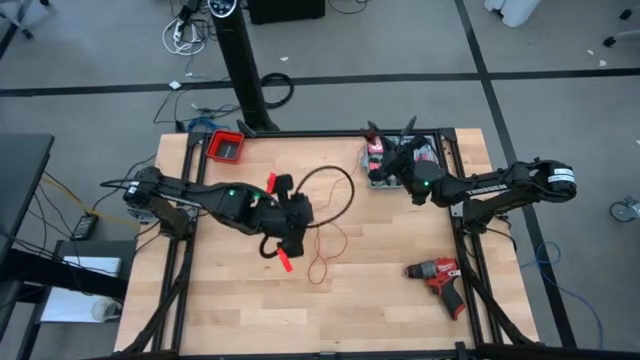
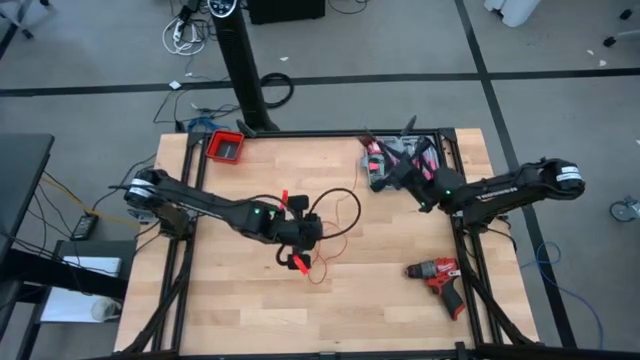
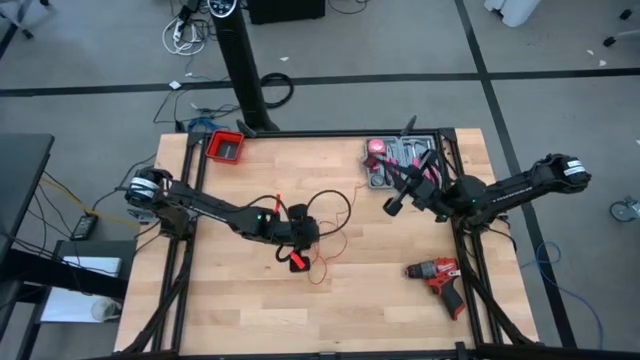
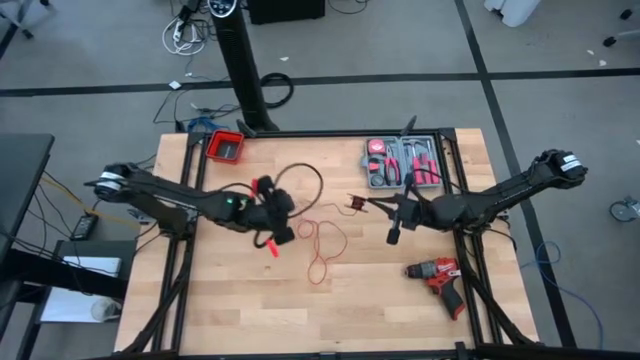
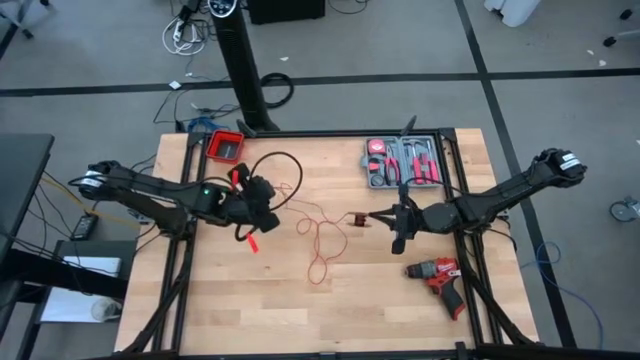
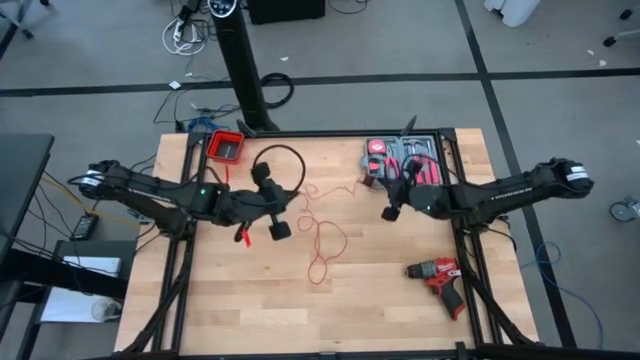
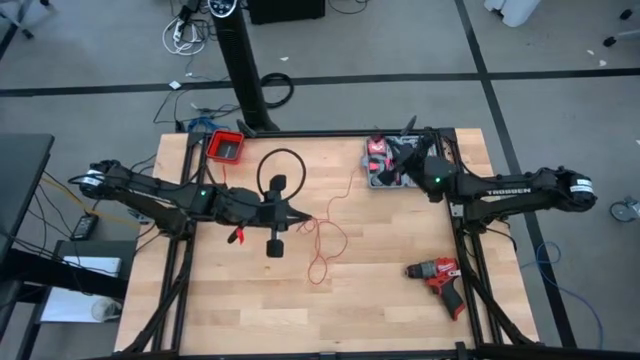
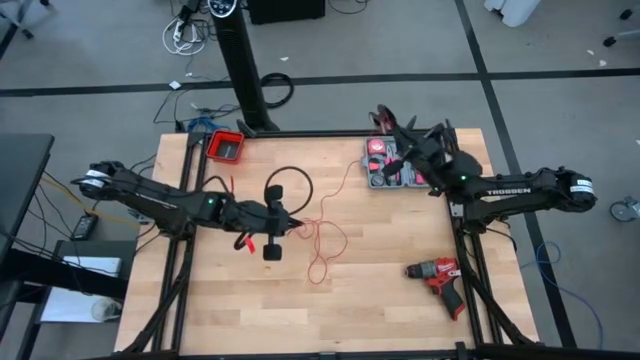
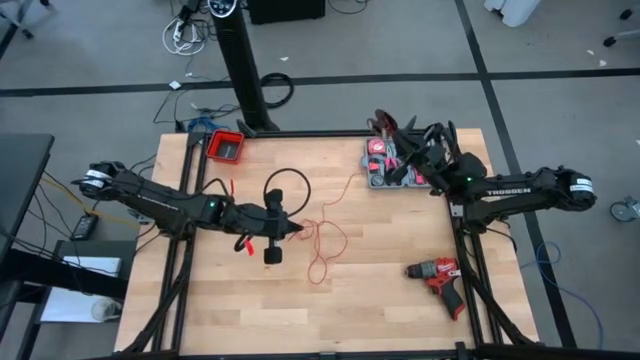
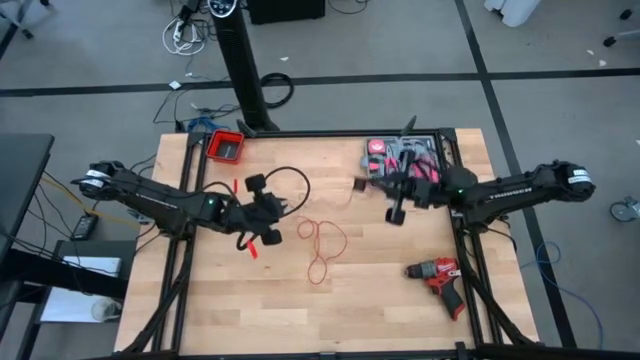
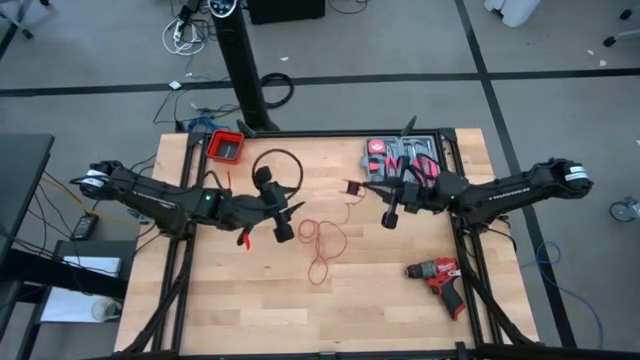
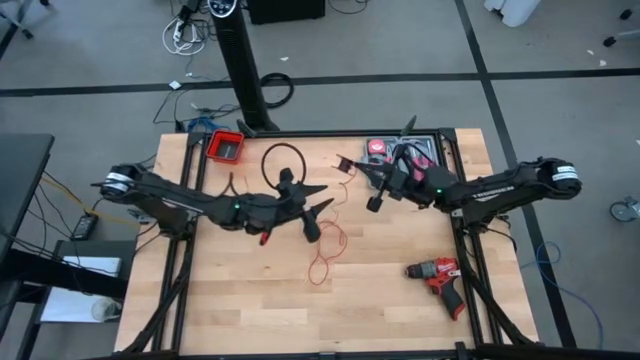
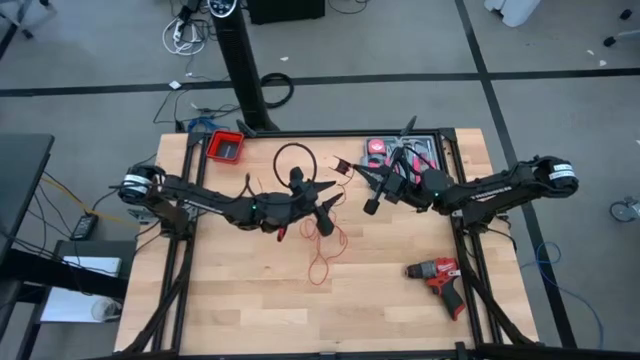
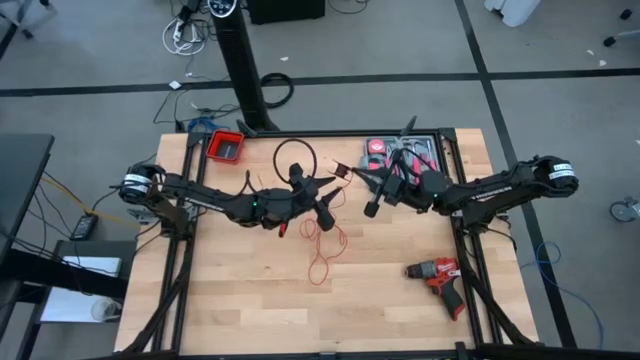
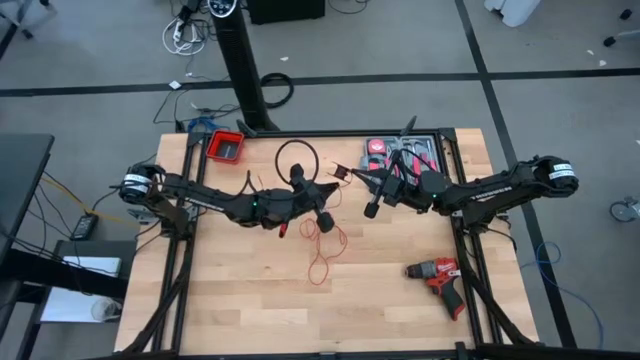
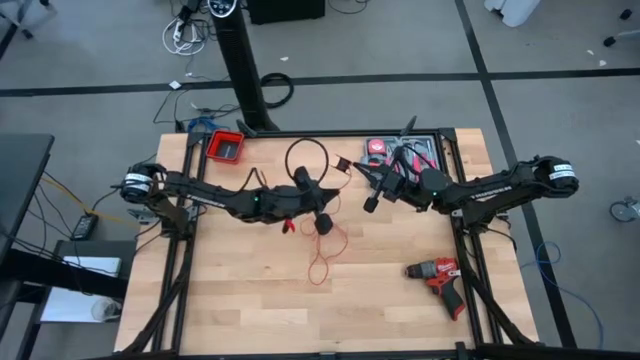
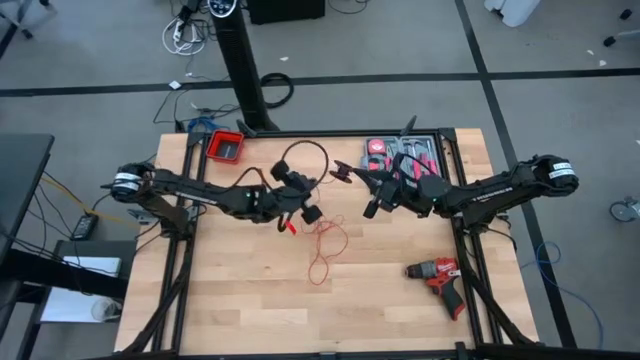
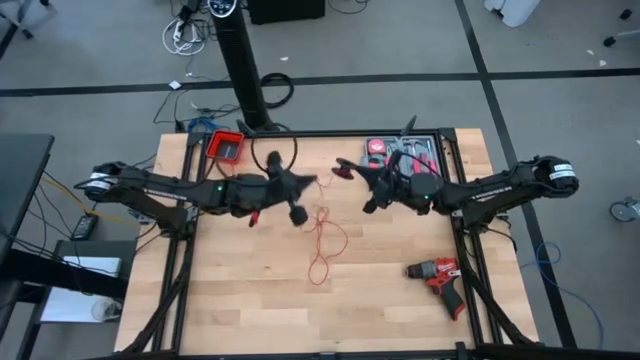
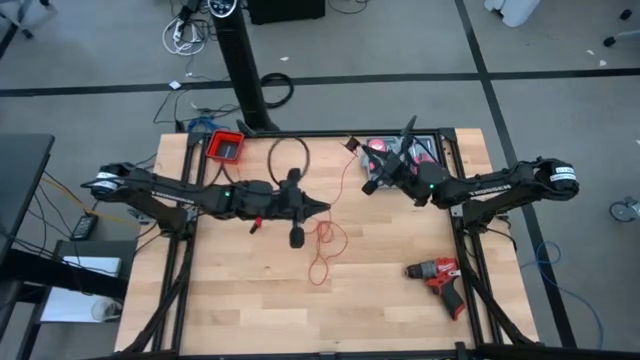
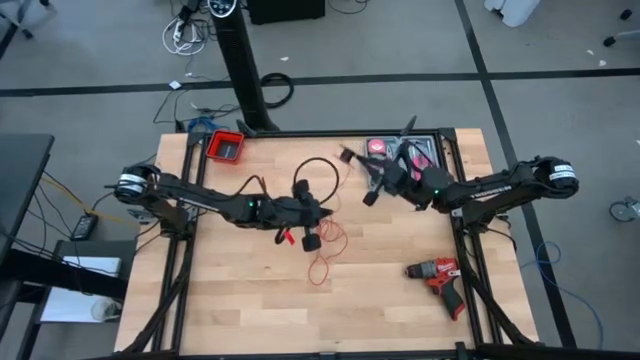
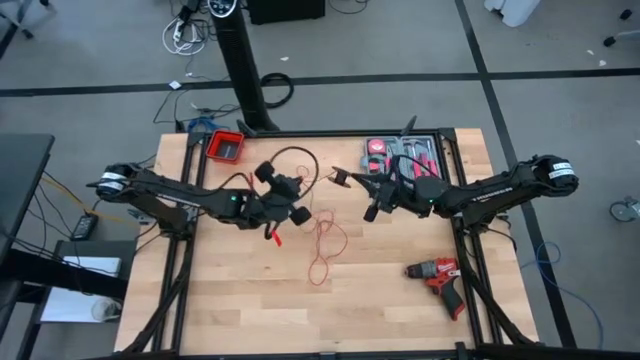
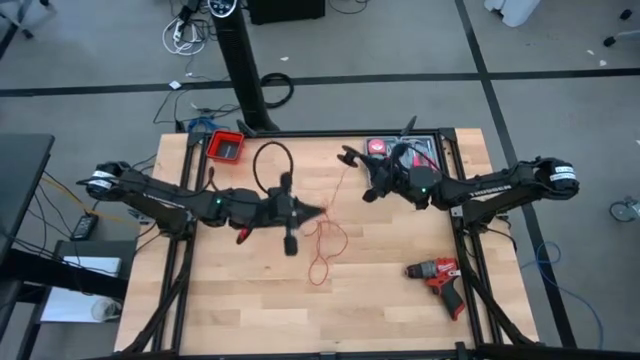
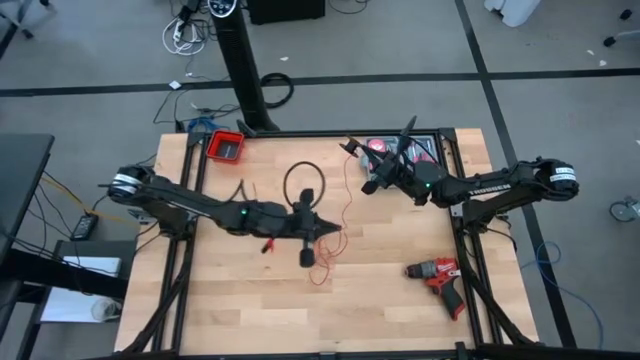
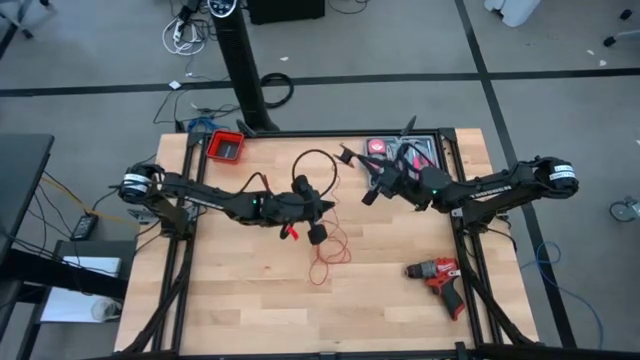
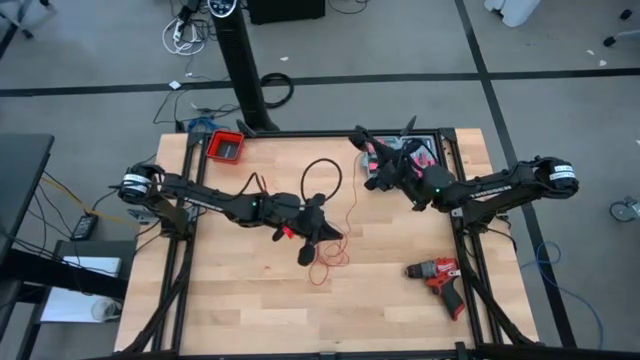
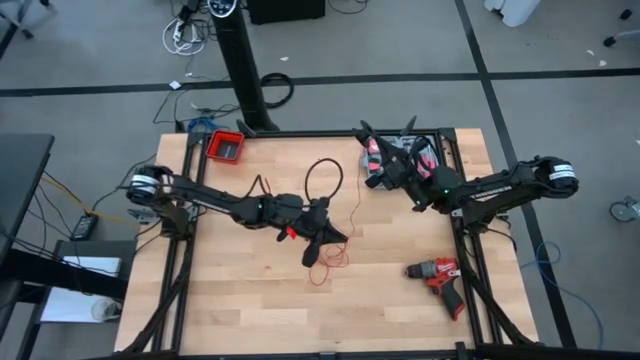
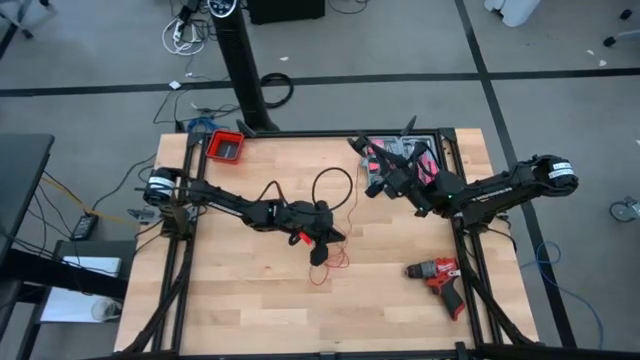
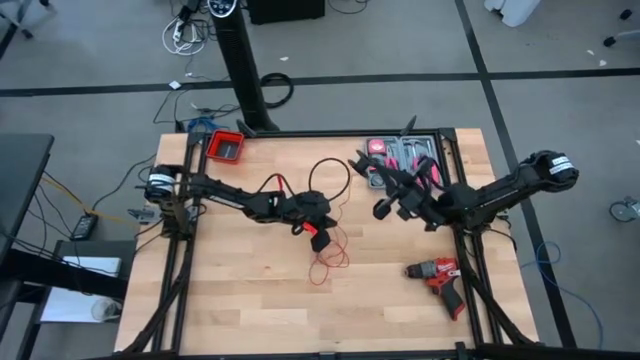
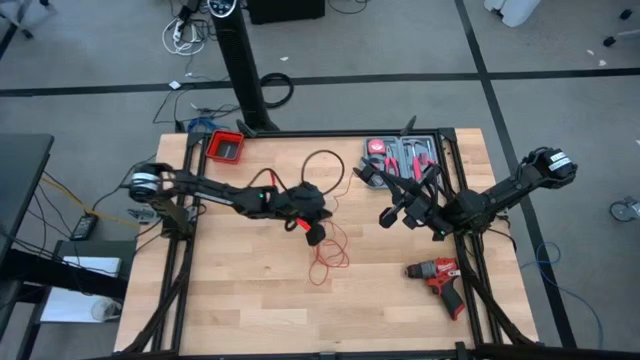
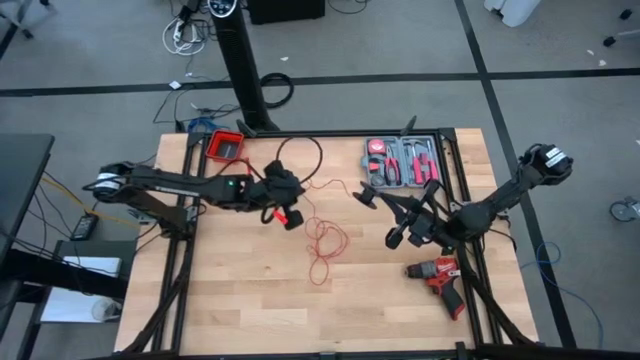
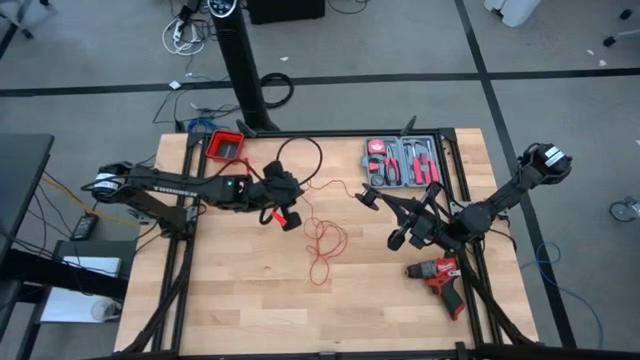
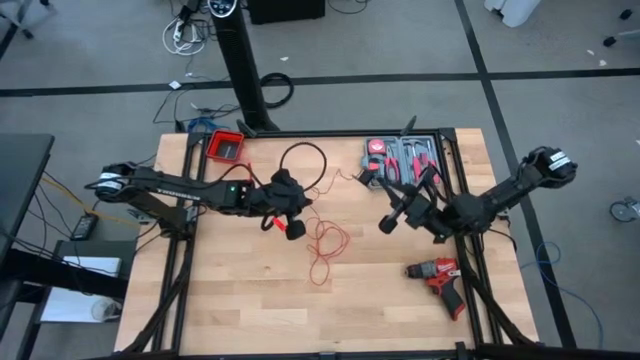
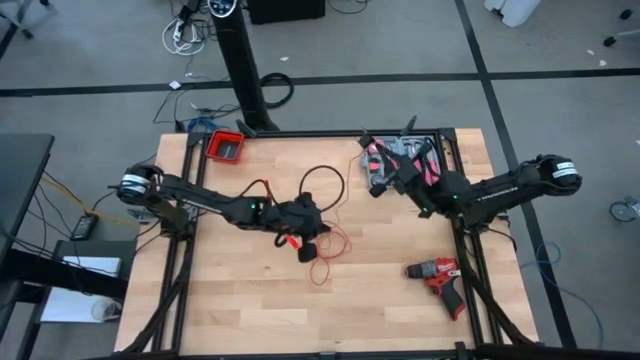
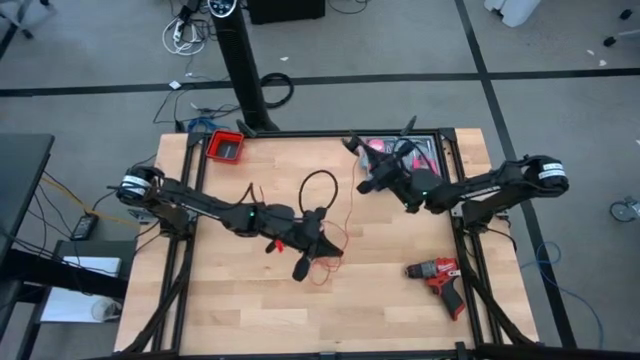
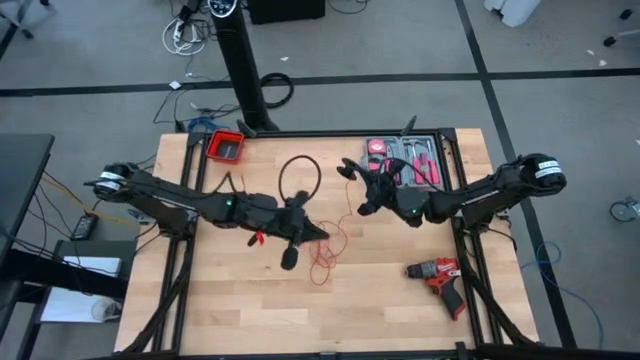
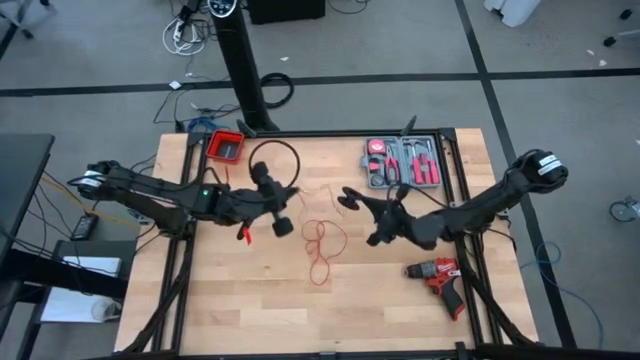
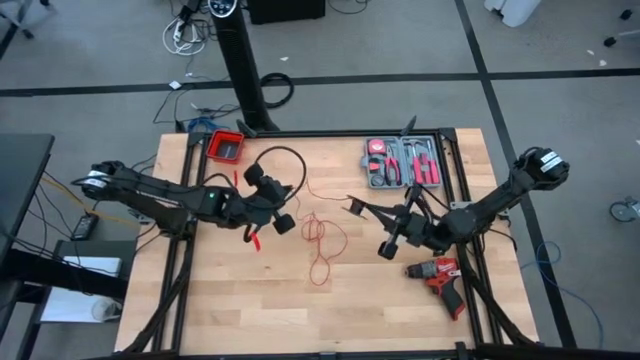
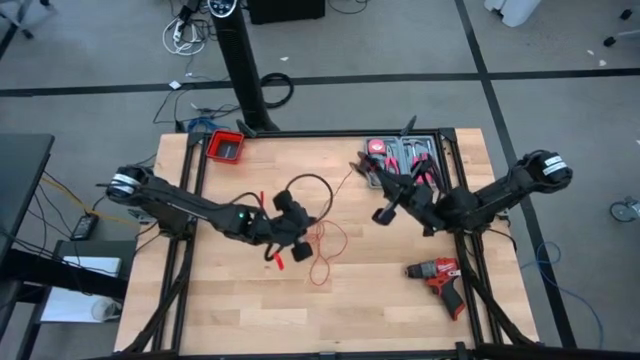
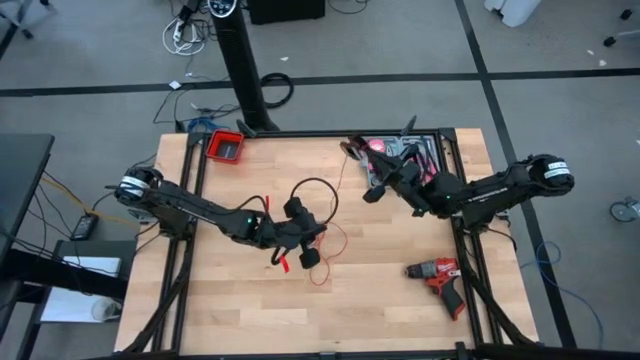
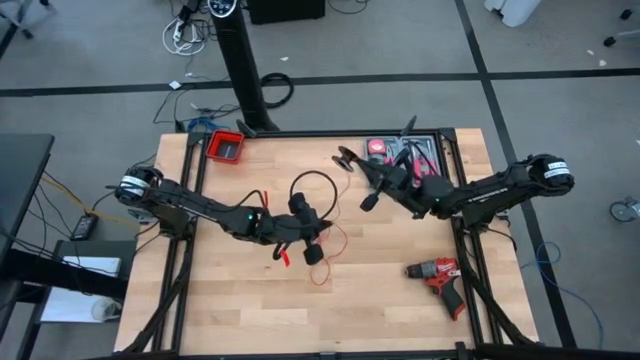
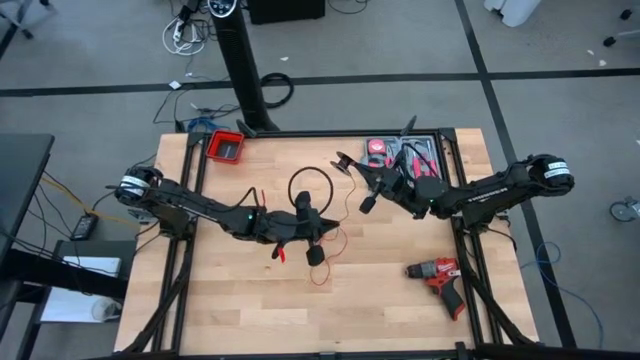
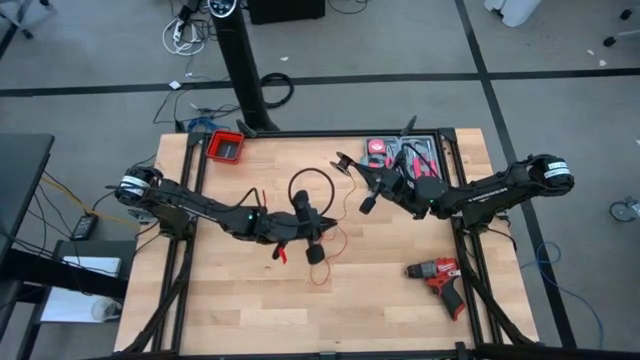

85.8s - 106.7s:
Task: Coil cords
Uncoil the red wire from the black spool
